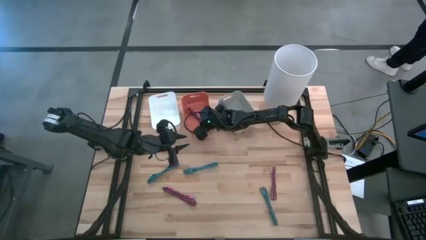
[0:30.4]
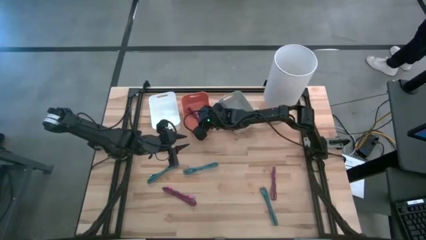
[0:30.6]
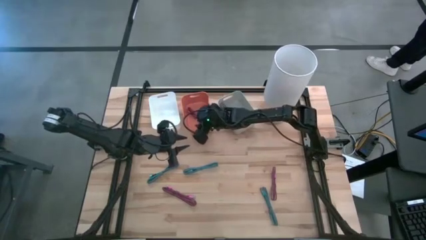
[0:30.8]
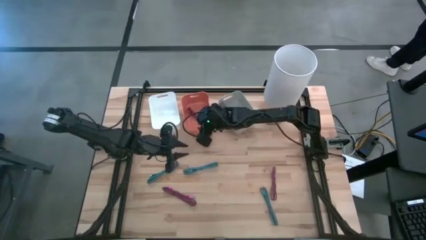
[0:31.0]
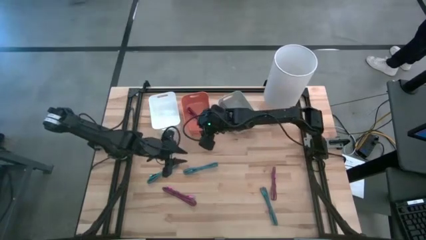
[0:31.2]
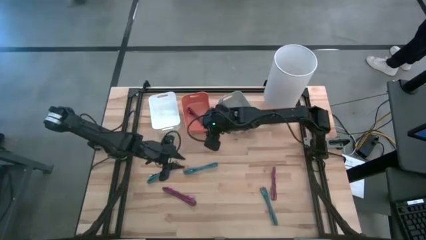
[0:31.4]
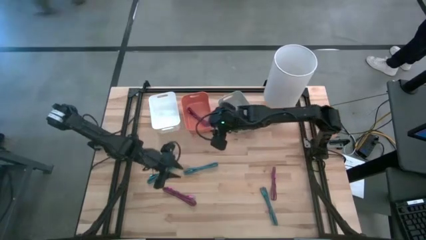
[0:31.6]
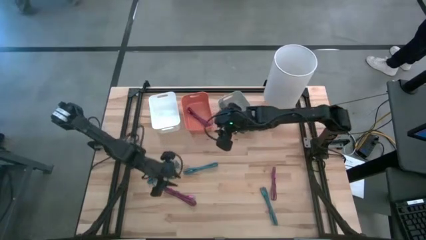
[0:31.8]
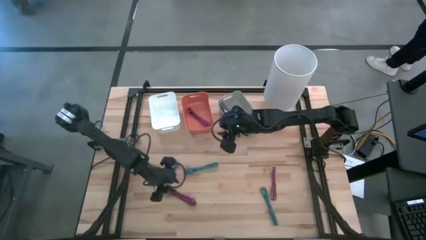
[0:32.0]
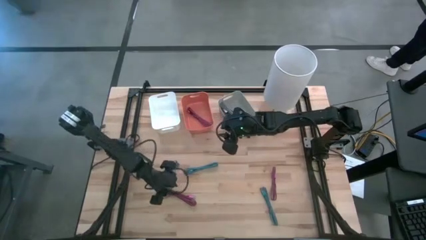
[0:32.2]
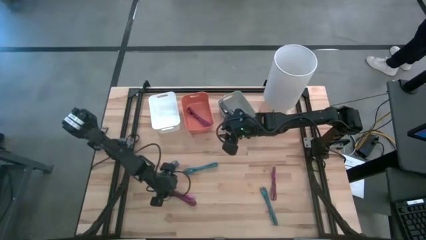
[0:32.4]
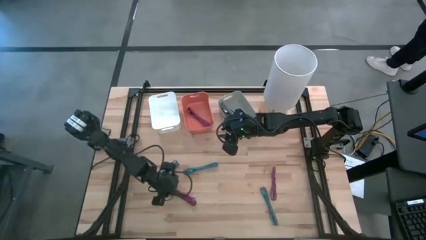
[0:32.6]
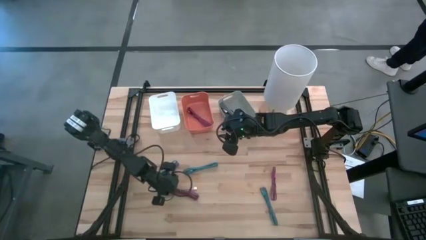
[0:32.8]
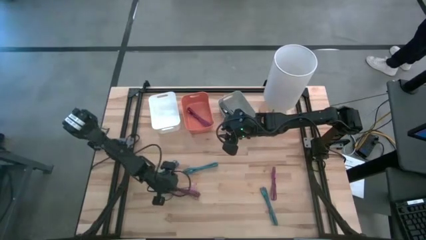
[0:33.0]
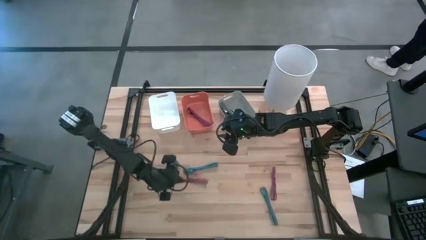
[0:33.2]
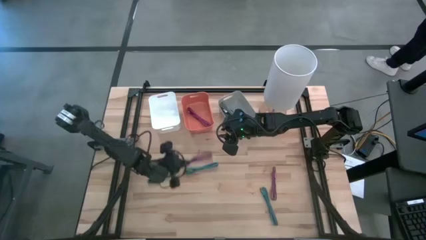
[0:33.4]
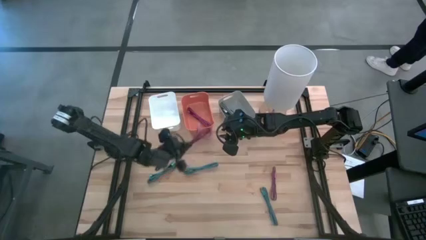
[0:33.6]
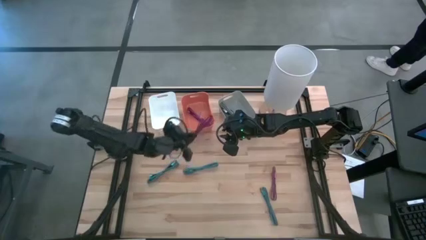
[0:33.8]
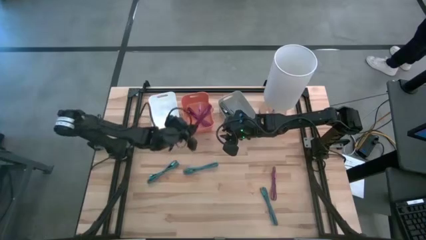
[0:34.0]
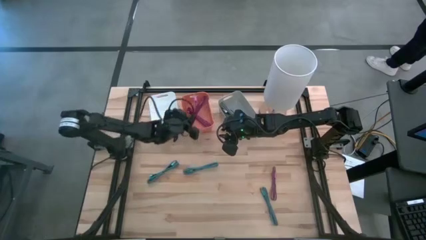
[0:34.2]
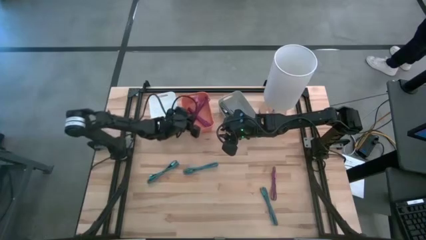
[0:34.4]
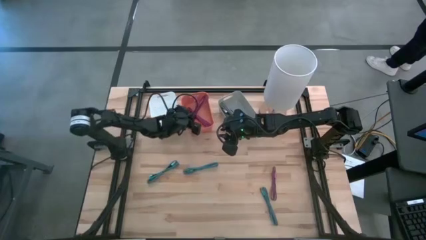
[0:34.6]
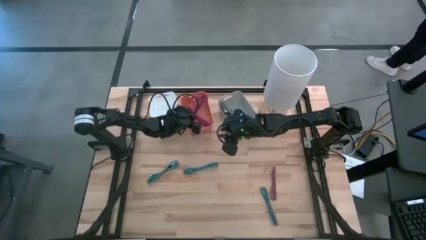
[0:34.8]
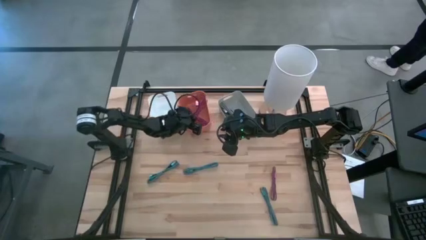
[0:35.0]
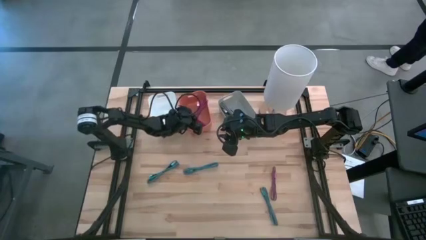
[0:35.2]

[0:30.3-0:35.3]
Task: Pick & Place USB Port
Put the left black and pink USB cable into the orange bin

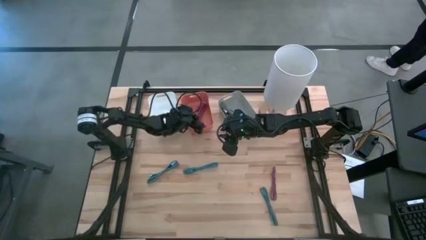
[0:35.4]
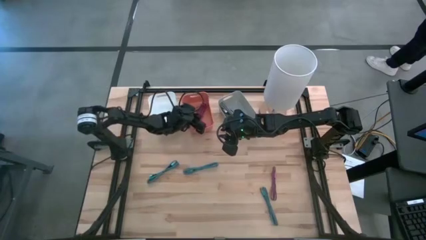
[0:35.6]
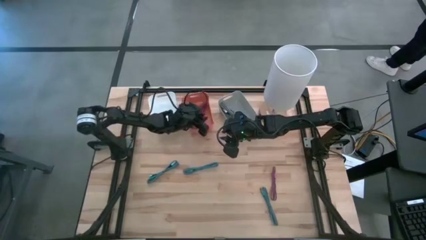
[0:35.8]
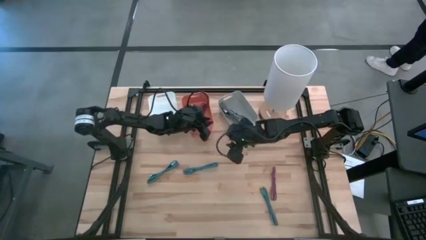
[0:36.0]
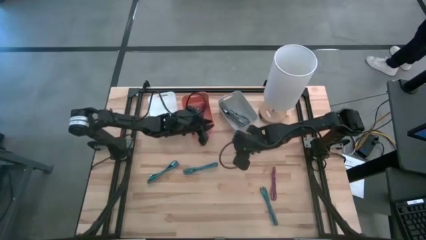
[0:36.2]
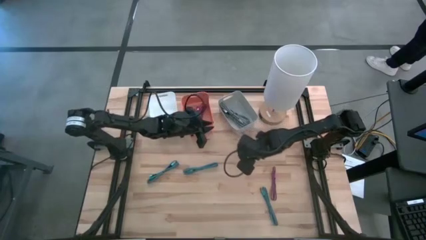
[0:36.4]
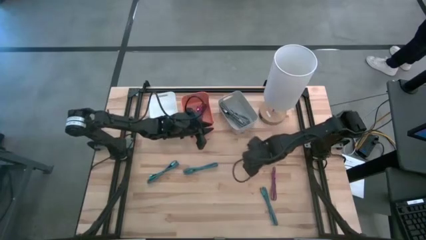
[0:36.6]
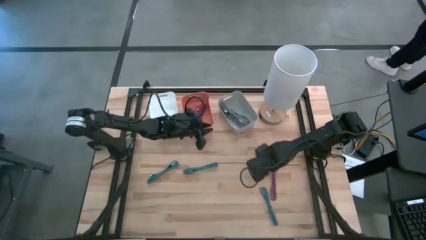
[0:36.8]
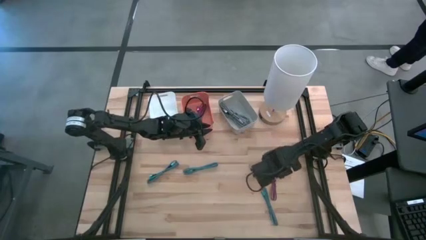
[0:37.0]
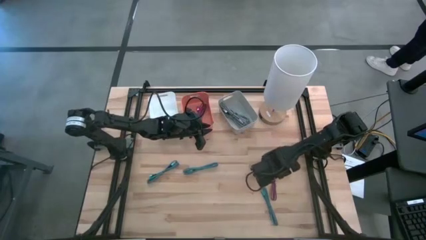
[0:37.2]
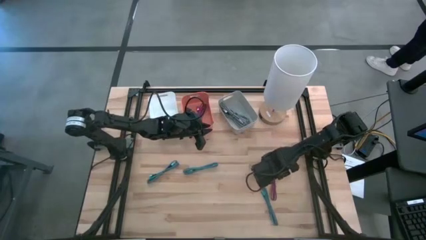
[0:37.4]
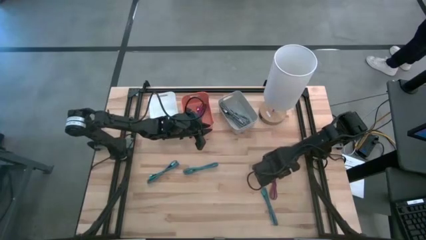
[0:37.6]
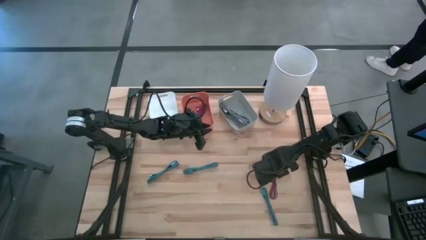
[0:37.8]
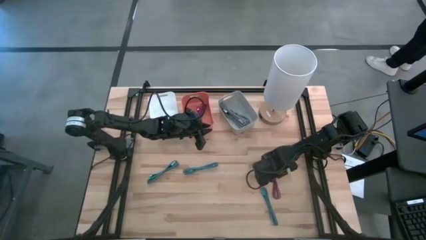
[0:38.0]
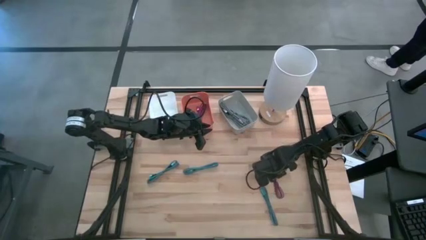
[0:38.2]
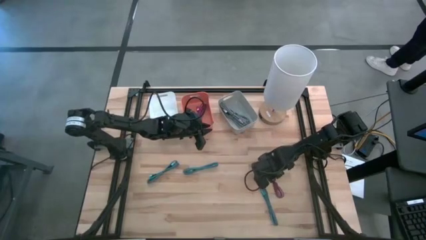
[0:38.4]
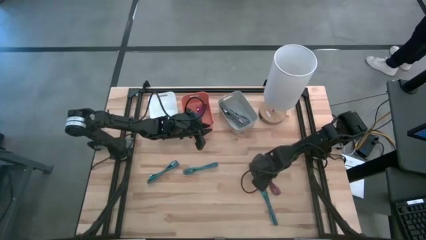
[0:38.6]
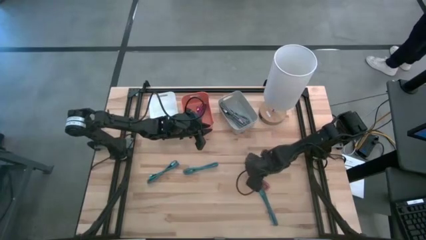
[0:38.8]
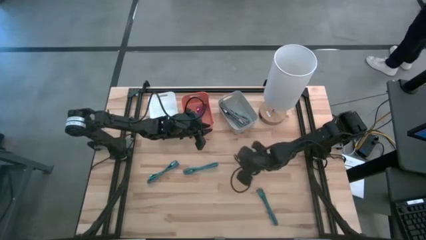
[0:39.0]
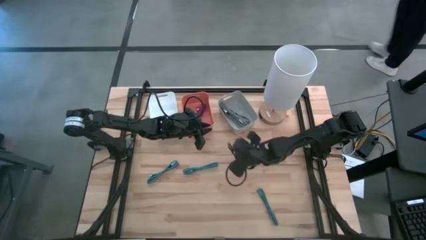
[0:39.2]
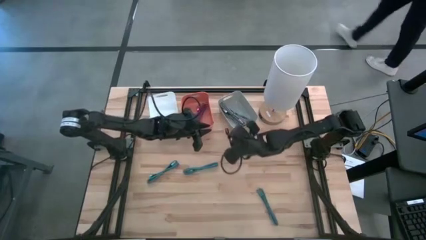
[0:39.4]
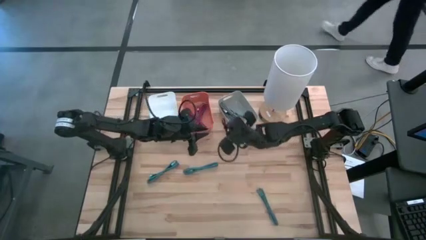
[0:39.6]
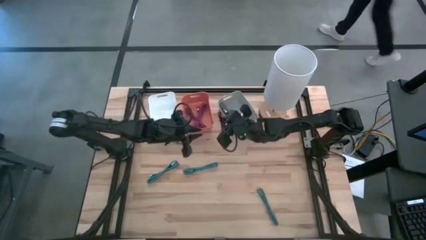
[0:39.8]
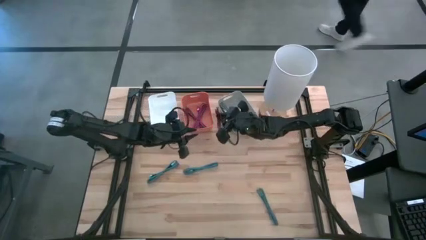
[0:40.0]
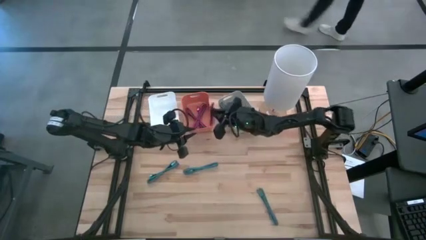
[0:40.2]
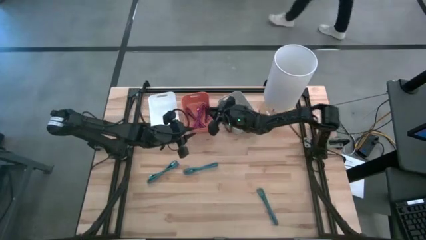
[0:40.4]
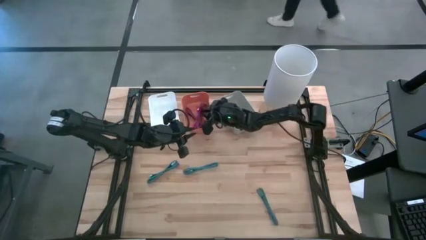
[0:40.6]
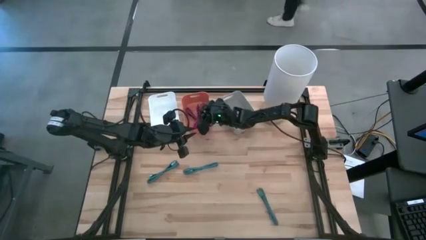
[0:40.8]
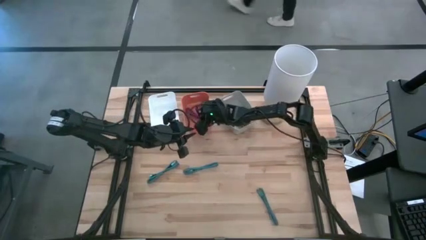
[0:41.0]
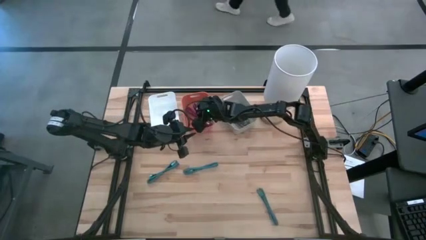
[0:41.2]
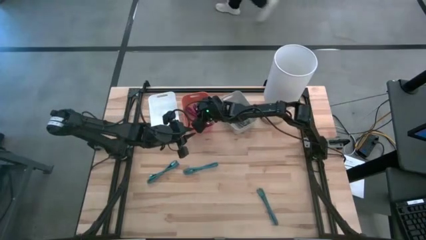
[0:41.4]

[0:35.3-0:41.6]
Put the black and pink USB cable into the orange bin

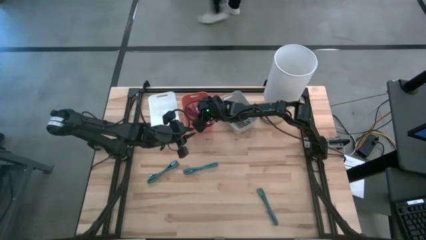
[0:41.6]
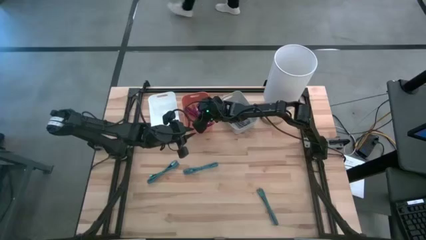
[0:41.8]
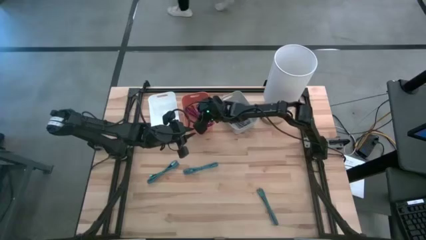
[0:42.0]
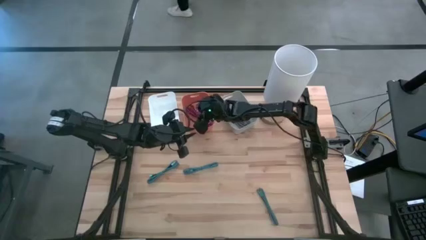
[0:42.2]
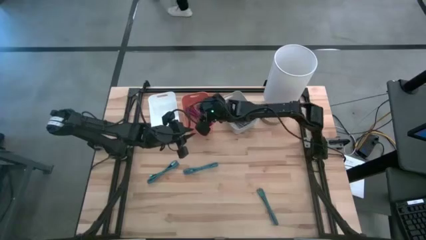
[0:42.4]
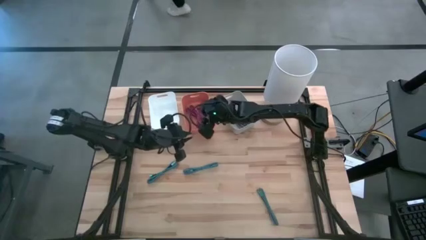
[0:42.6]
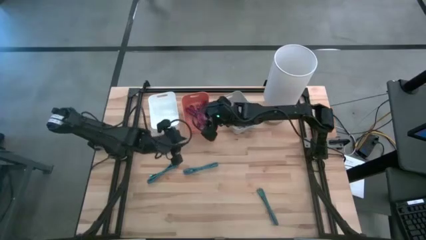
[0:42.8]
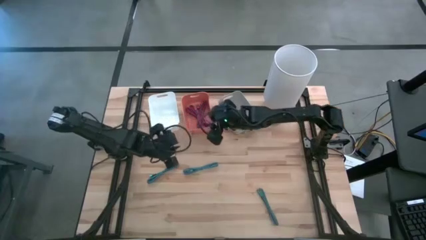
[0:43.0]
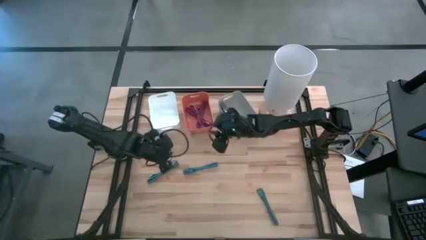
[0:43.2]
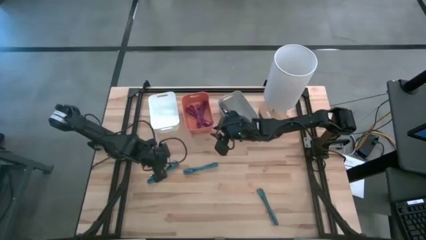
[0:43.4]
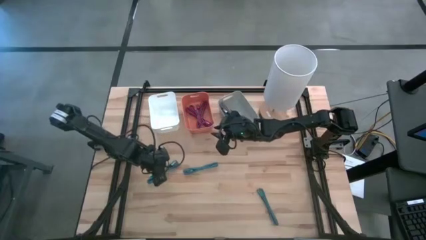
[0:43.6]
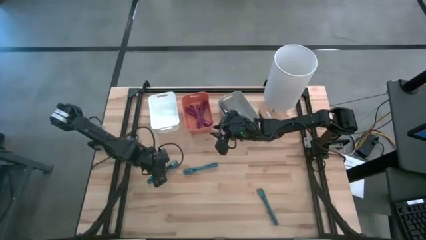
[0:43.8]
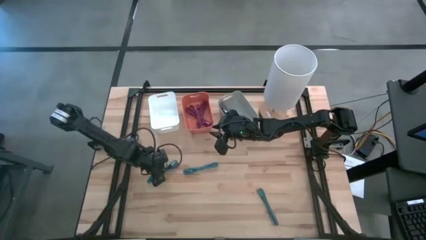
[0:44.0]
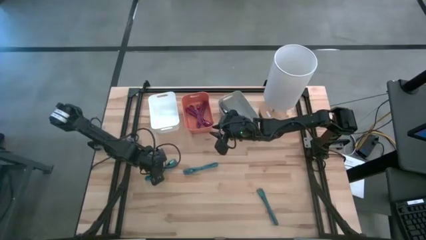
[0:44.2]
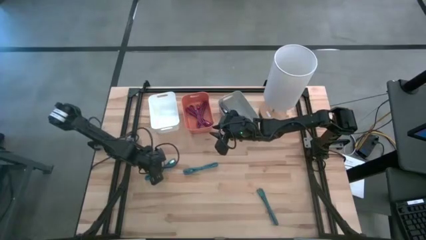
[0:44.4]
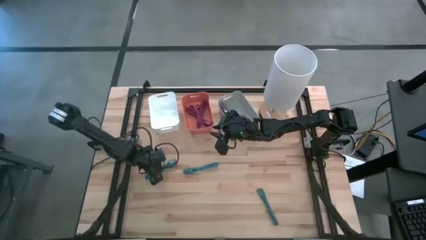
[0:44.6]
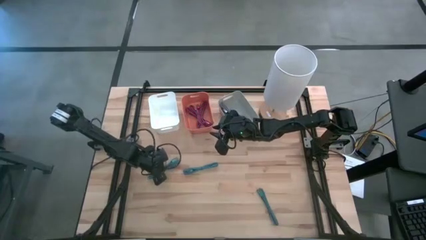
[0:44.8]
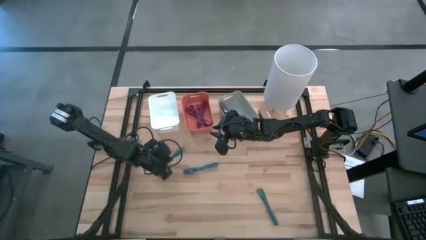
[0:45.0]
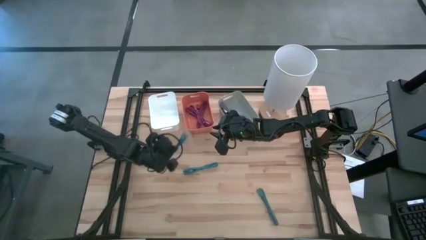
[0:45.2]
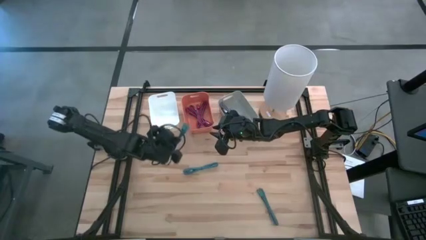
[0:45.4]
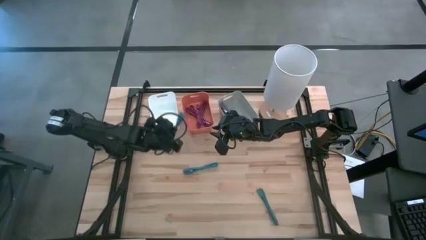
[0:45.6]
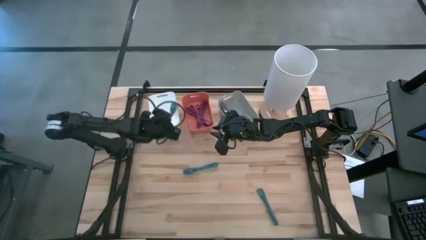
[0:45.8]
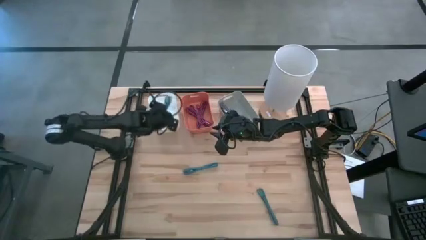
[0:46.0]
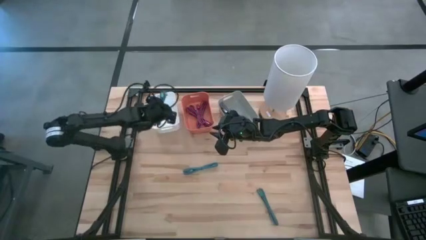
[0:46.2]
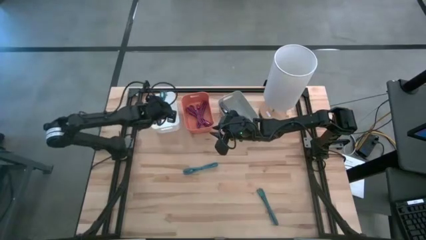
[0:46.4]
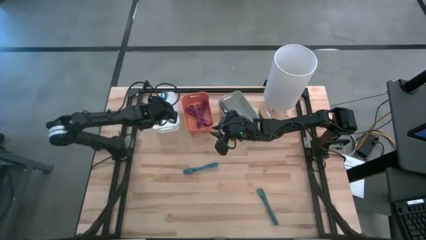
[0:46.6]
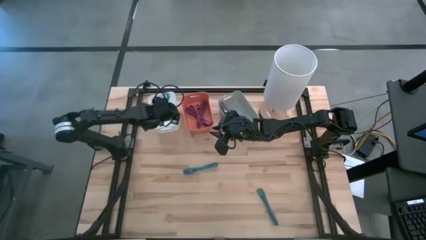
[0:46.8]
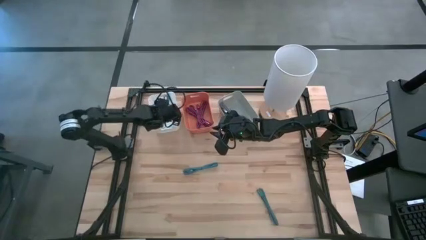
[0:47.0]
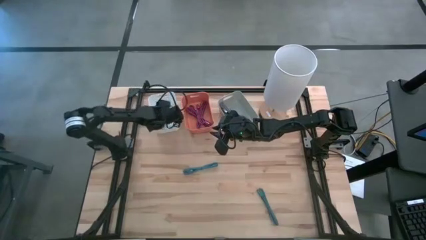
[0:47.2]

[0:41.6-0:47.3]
Put the top left black and blue USB cable into the white bin
